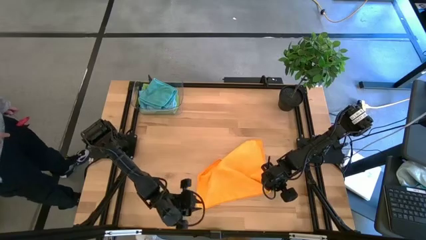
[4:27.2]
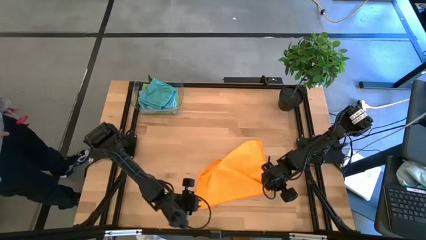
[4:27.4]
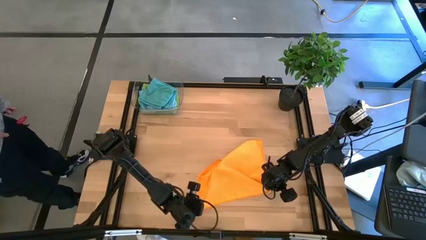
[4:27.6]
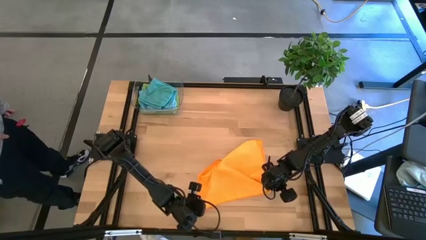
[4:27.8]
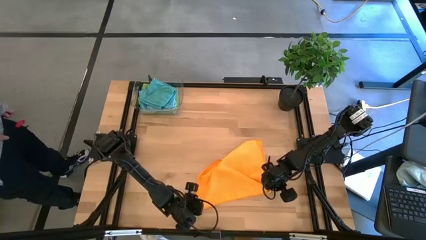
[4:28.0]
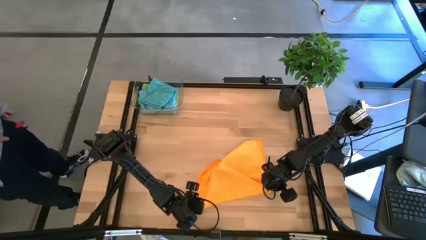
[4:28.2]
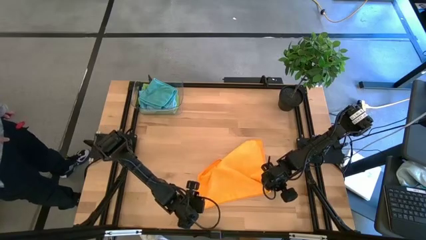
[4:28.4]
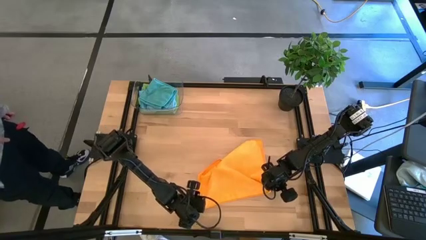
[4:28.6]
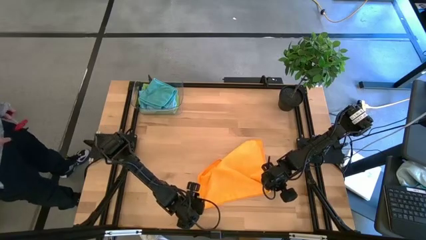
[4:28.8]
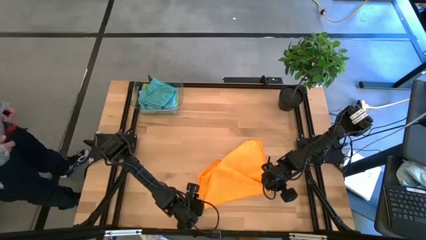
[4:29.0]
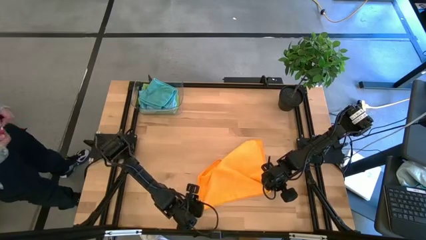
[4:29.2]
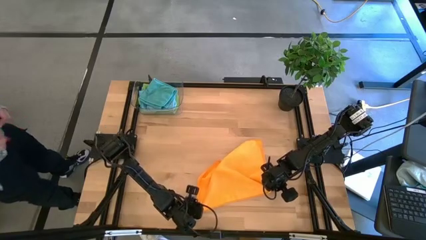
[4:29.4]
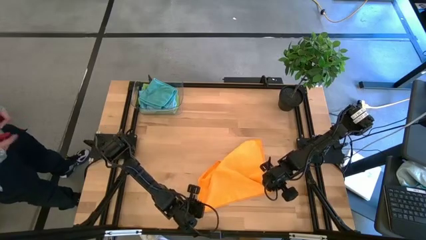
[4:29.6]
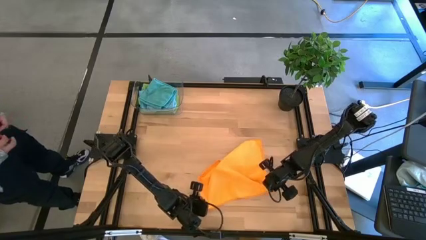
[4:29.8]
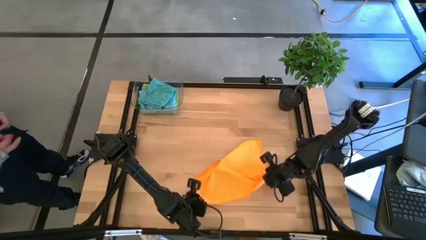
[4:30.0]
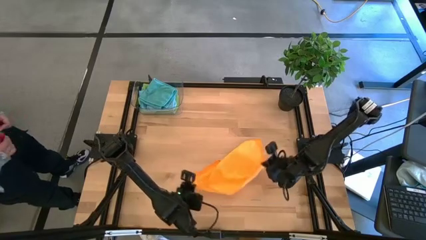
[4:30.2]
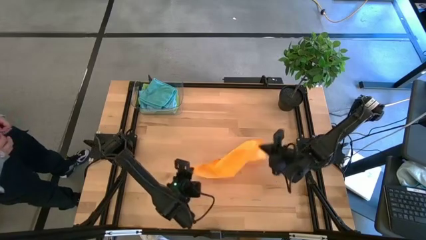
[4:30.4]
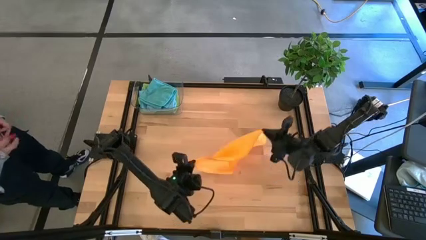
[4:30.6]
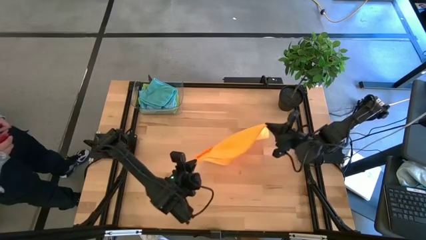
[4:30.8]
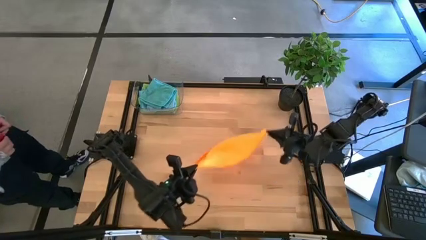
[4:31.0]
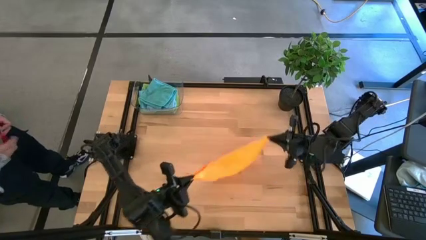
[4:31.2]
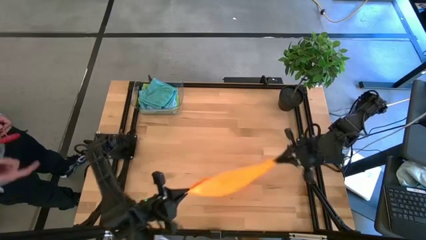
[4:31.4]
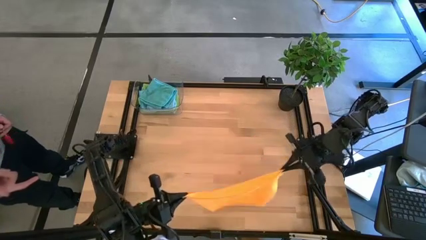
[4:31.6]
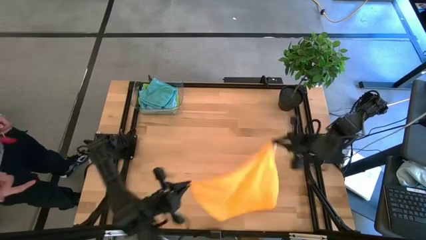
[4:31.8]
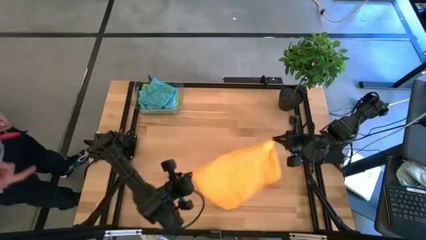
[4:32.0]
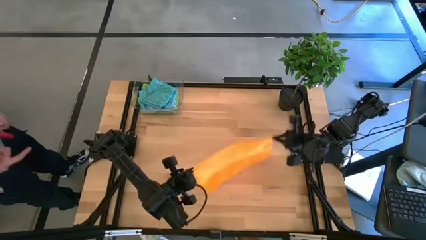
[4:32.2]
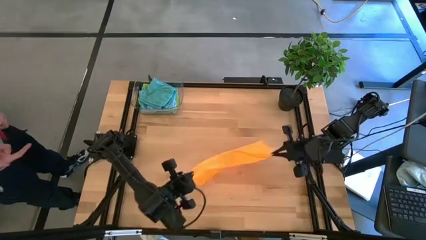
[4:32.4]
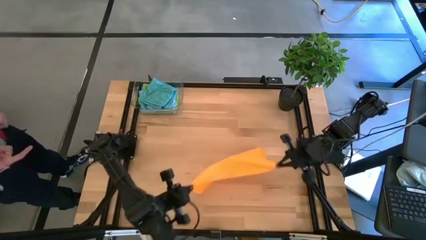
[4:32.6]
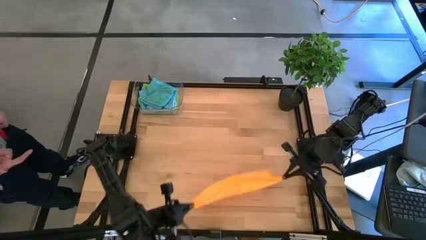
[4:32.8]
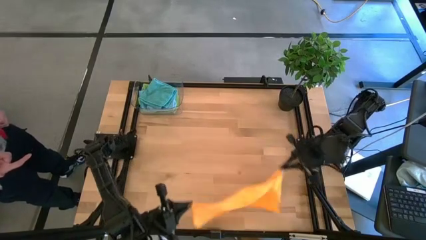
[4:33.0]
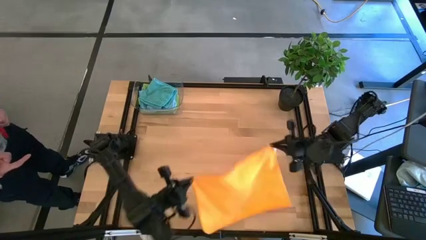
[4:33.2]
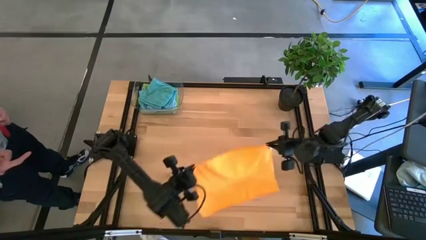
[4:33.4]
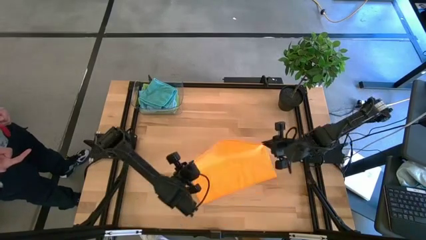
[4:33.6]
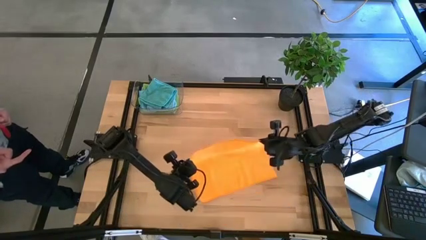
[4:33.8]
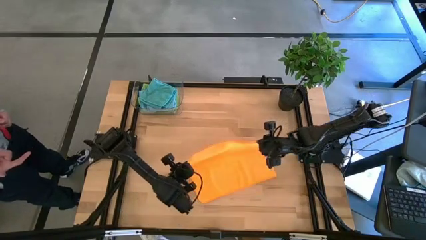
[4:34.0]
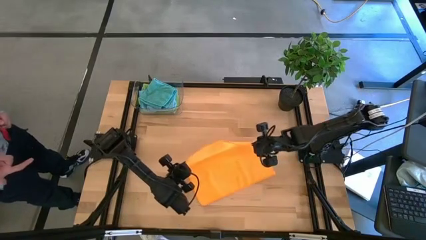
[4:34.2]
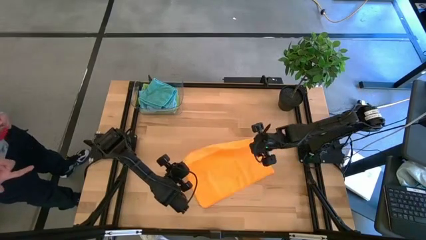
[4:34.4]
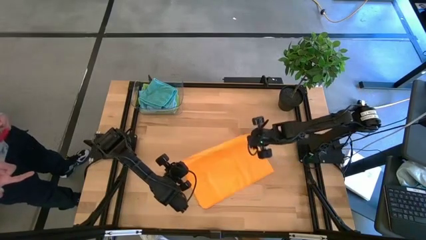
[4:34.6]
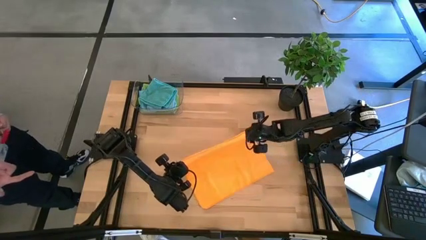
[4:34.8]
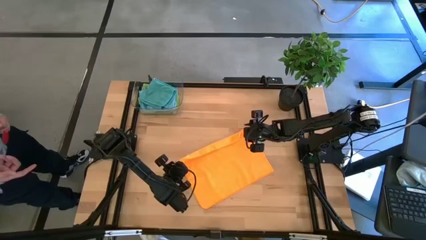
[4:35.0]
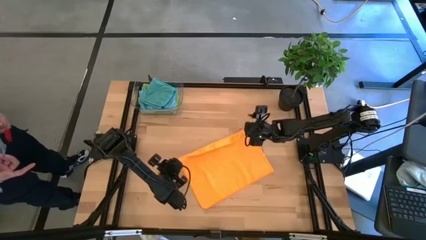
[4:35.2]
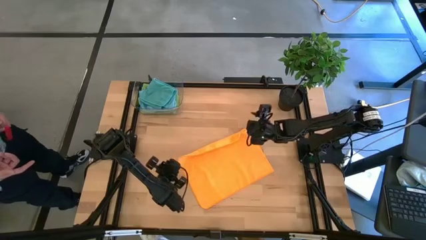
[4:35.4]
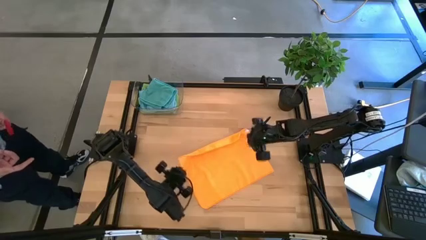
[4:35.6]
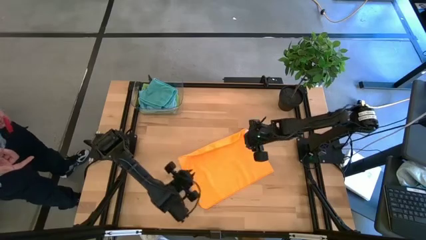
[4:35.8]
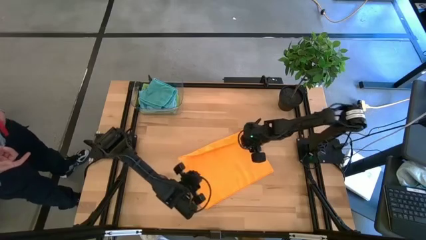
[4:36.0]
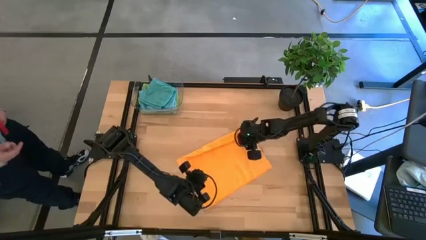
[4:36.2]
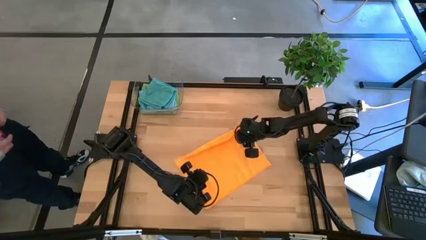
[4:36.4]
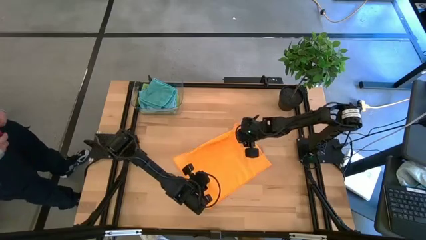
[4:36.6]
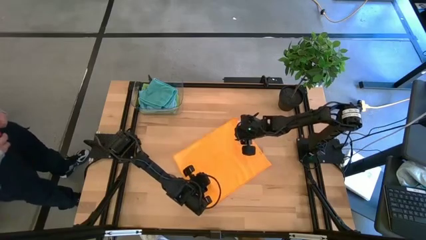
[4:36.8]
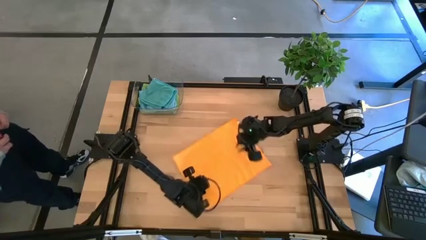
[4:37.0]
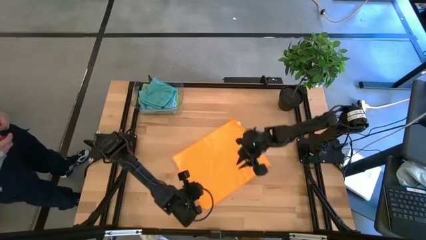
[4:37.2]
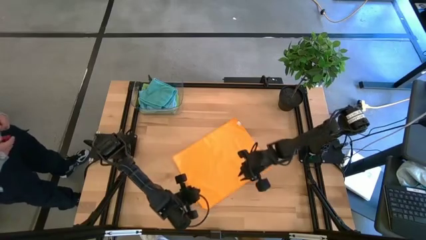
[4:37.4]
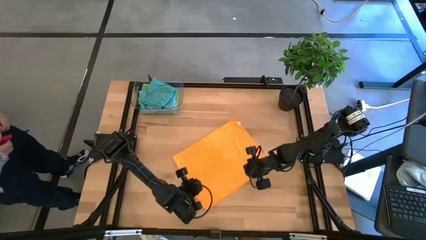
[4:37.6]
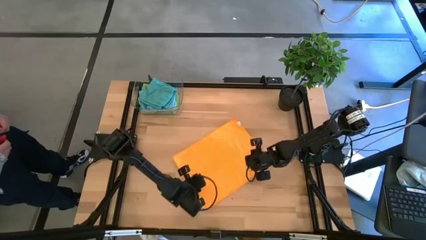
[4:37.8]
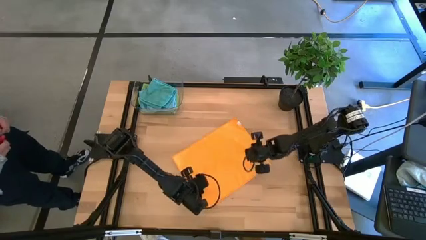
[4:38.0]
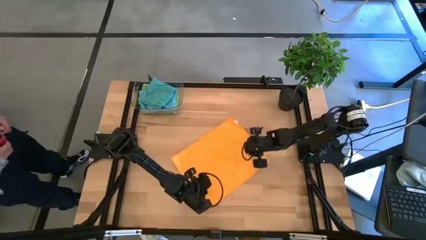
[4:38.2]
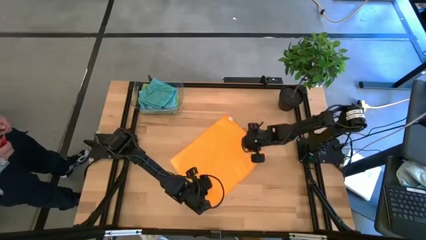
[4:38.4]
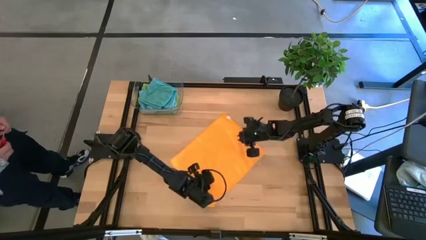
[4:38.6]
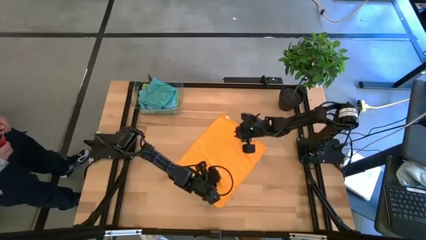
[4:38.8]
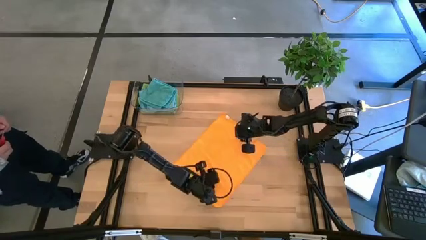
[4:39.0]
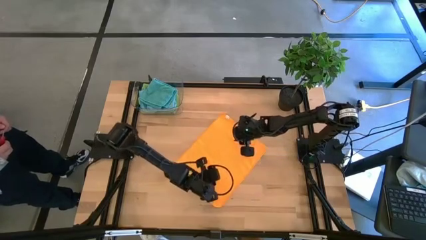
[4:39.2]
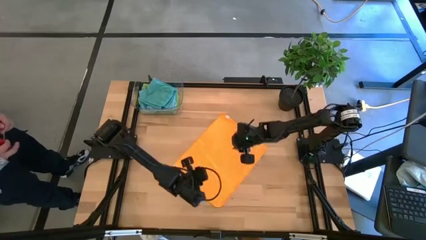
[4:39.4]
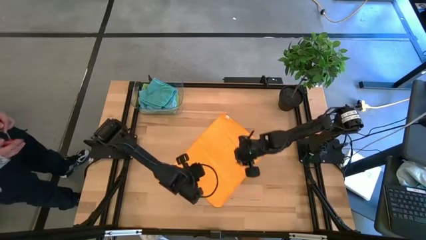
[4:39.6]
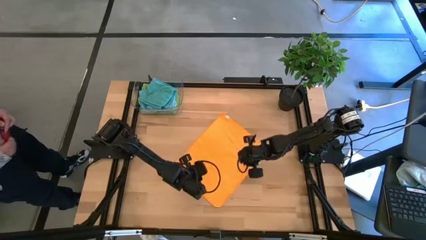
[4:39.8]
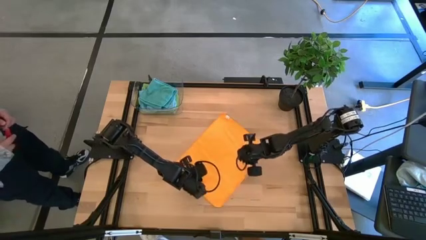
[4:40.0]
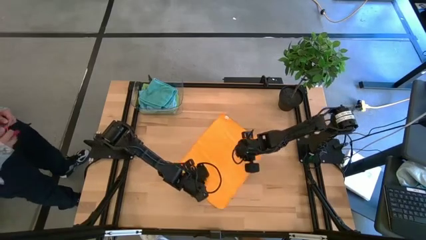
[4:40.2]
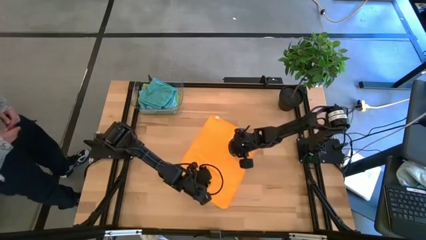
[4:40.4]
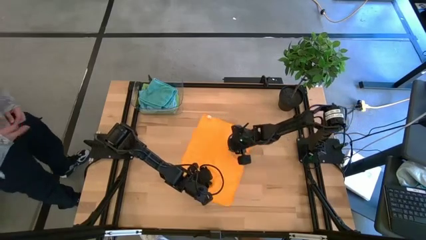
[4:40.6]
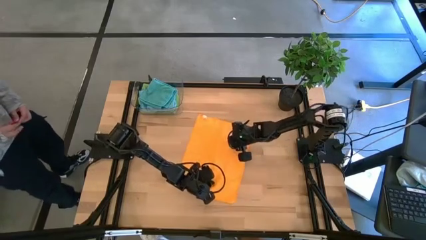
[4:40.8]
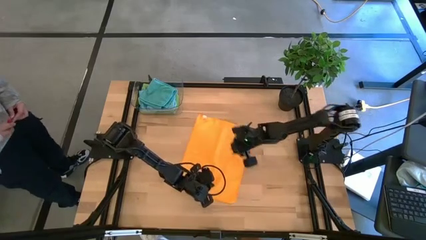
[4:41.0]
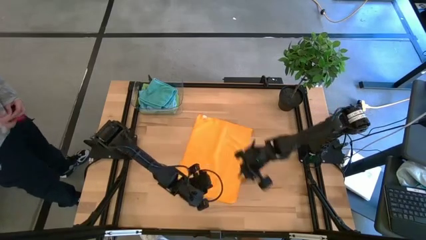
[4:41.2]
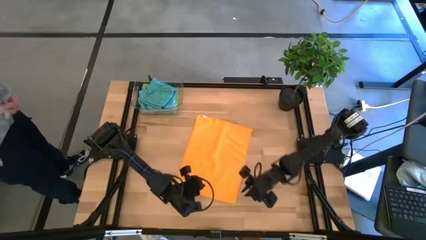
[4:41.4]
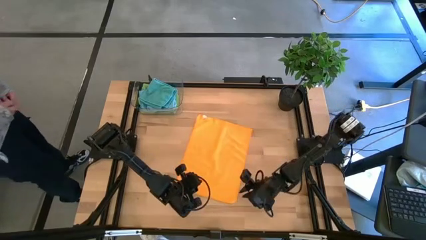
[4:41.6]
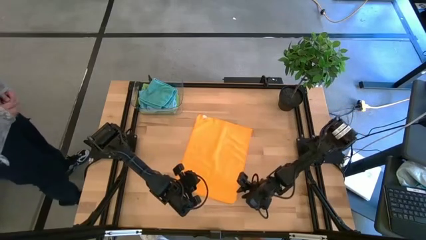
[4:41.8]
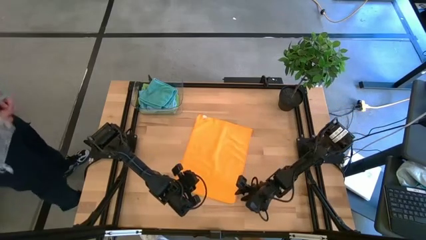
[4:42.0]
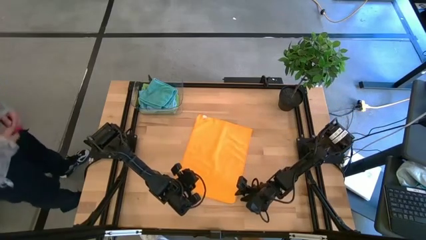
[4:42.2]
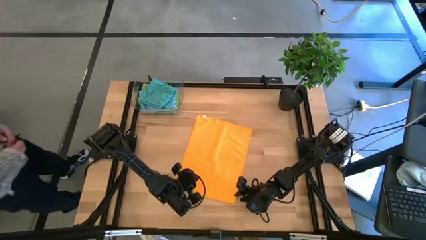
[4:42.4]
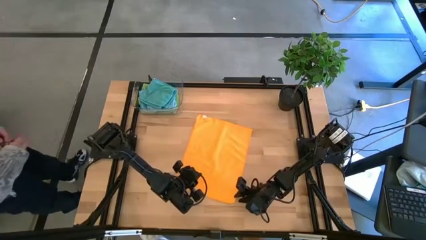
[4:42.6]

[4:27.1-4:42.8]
Task: Fold microfiber towels
Fold the orange microfiber cloth
